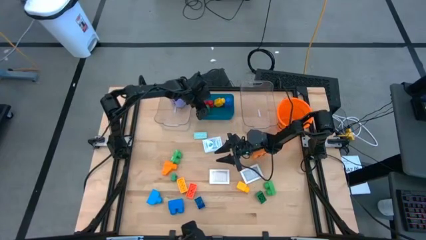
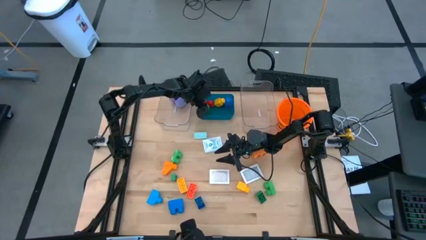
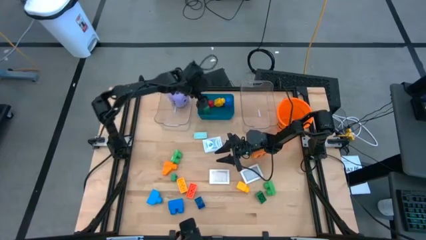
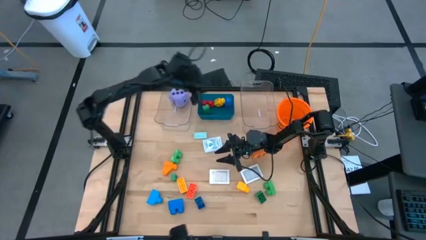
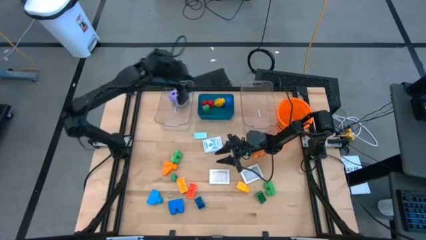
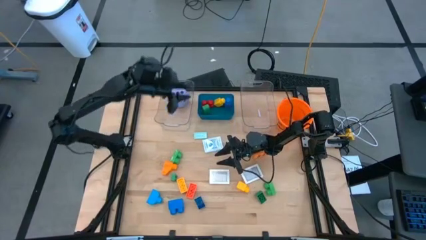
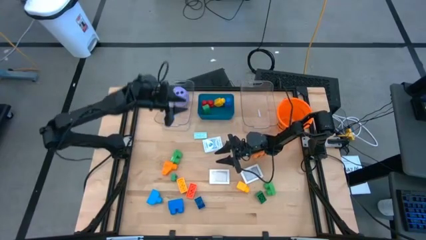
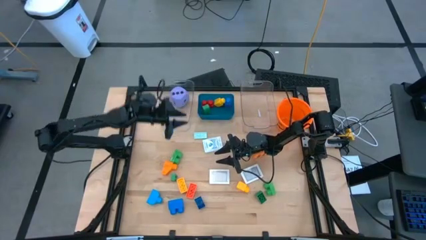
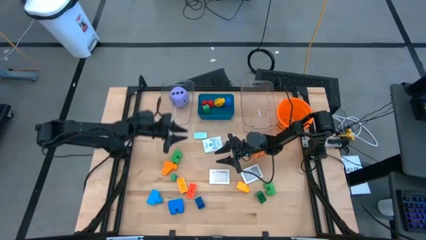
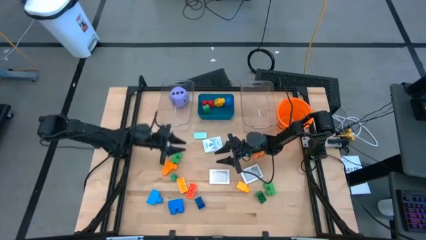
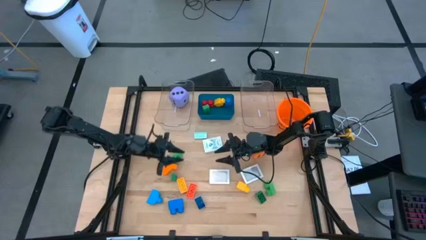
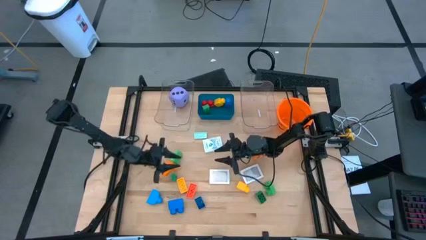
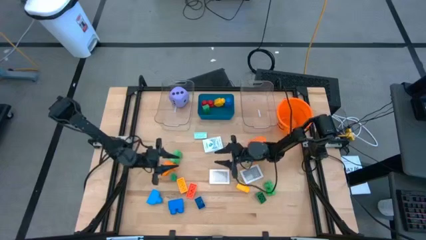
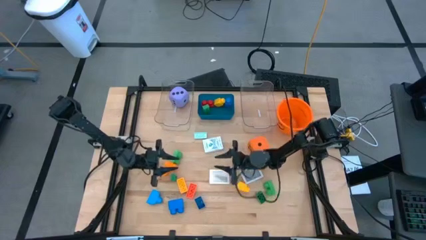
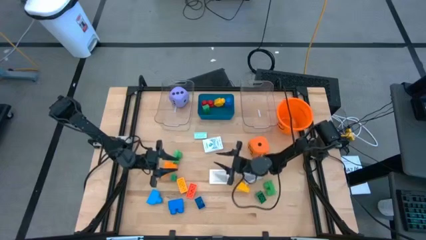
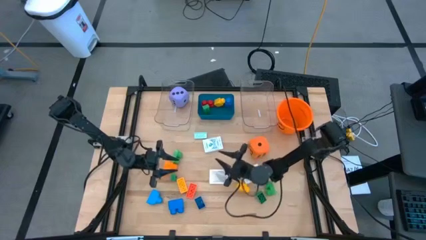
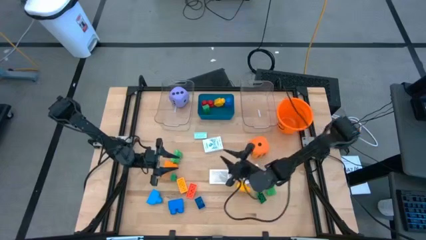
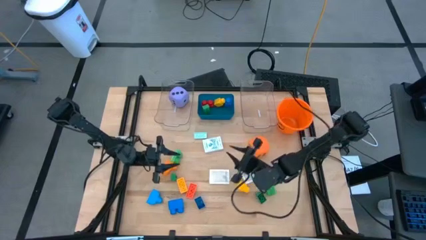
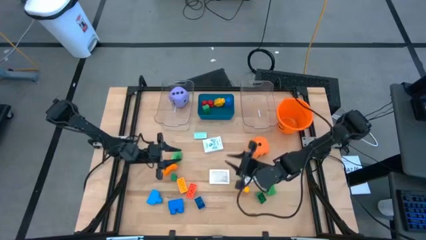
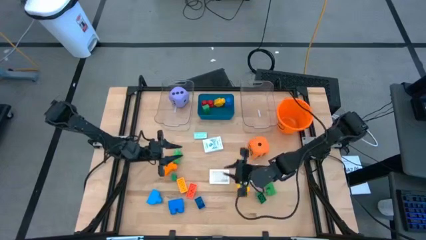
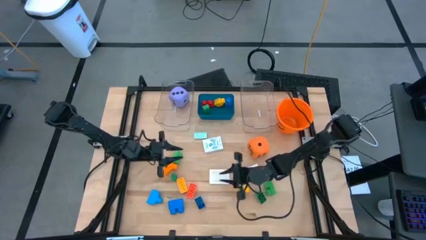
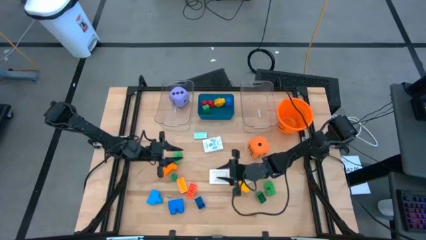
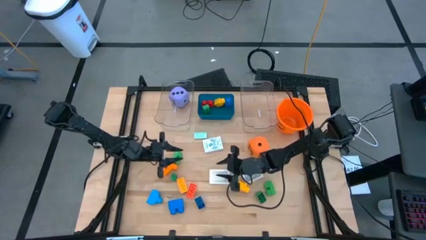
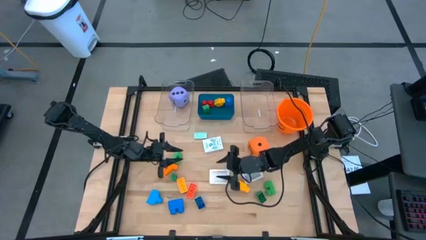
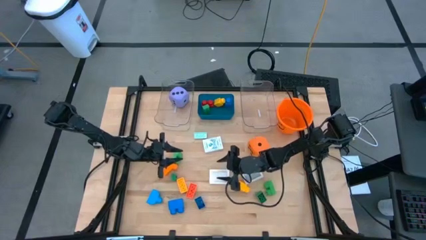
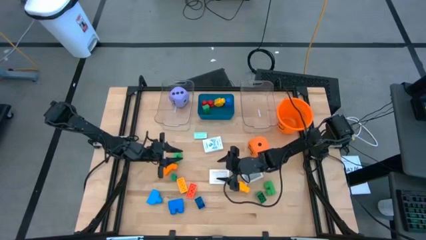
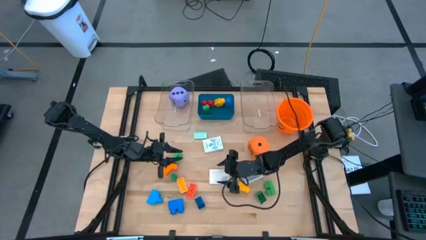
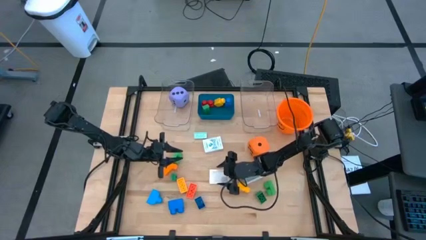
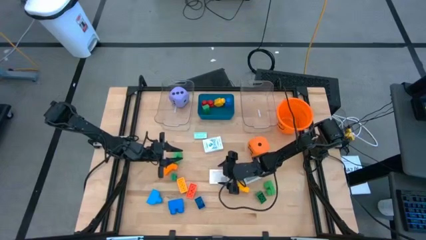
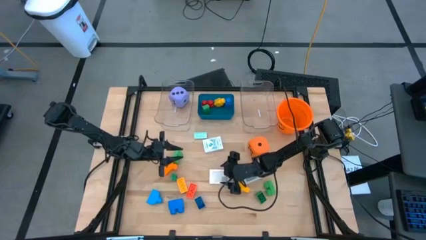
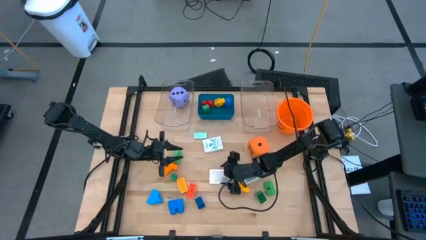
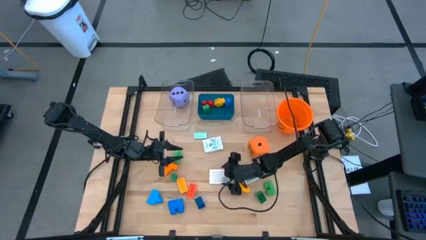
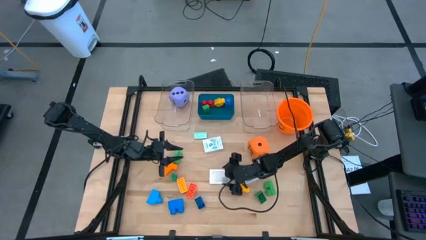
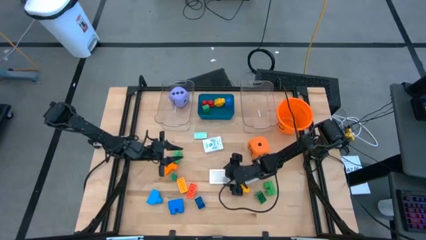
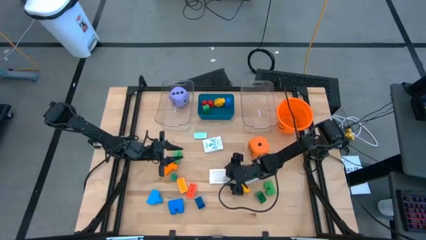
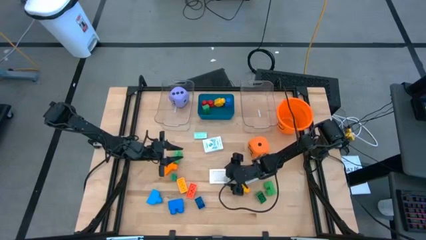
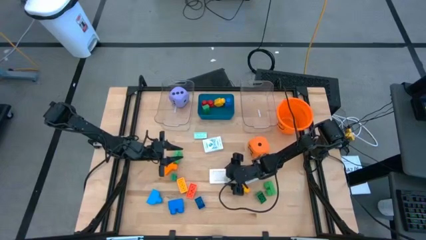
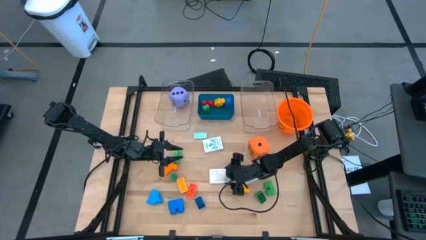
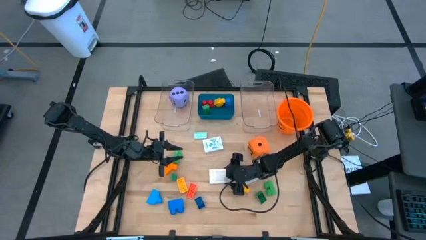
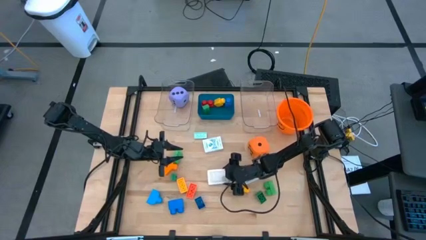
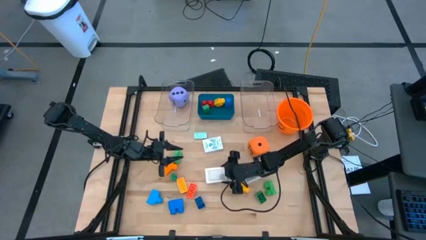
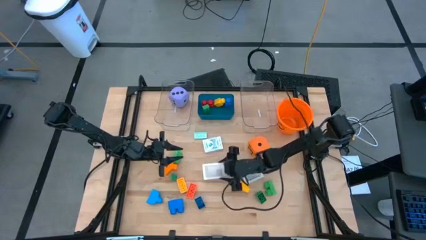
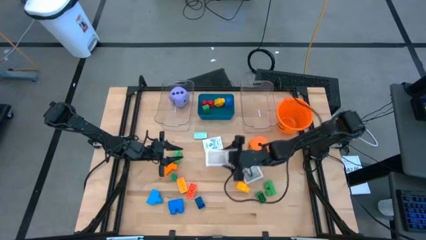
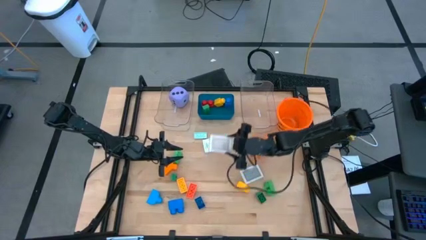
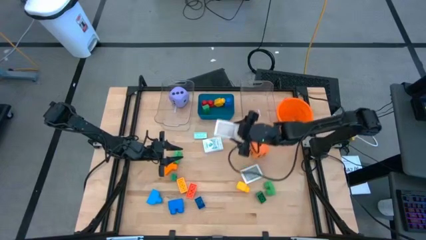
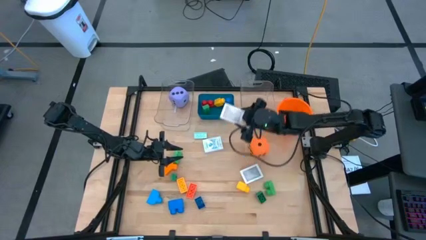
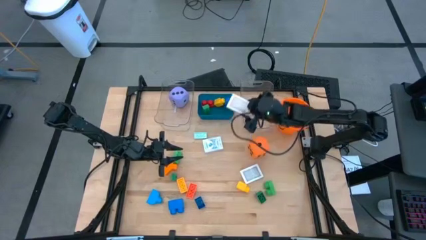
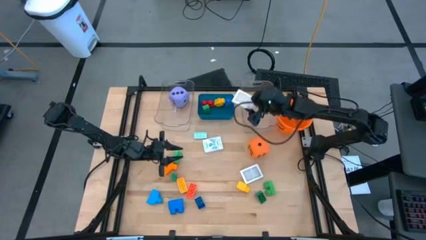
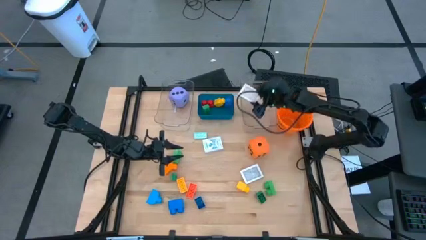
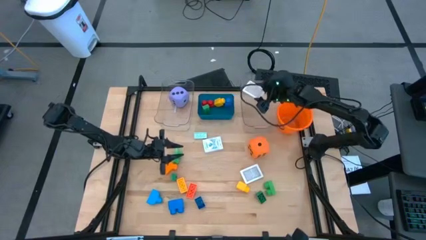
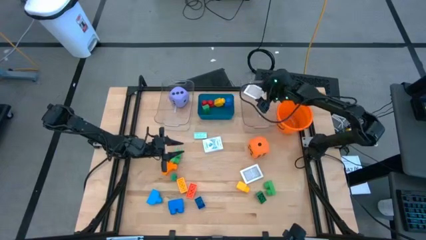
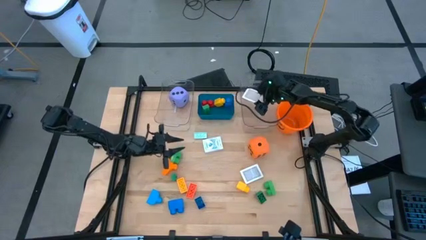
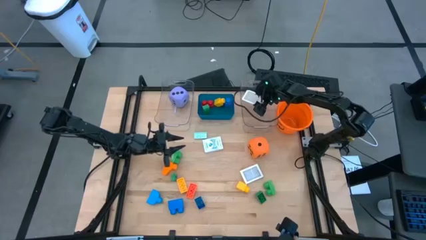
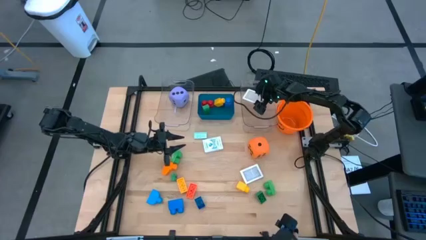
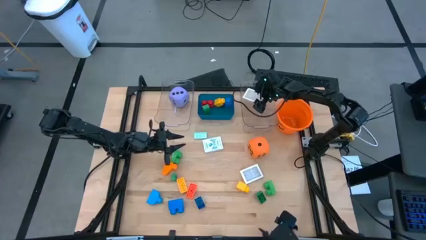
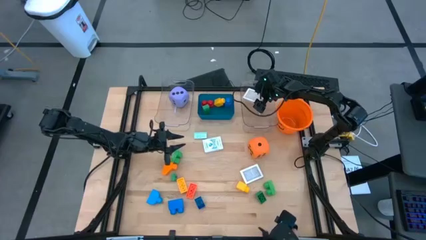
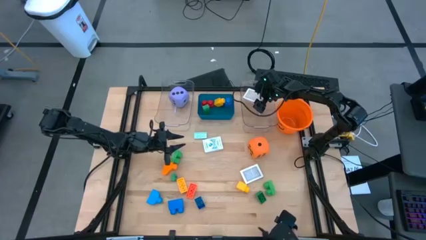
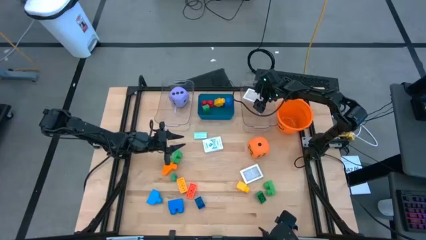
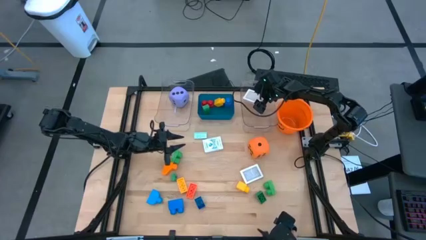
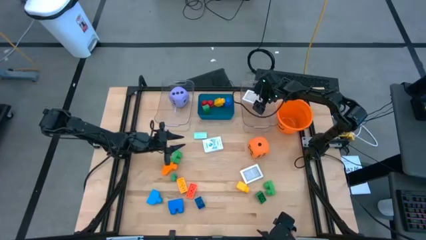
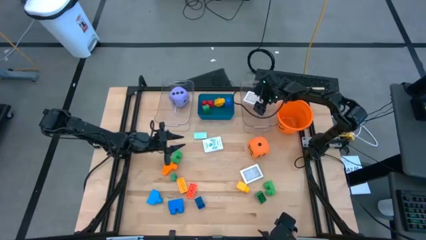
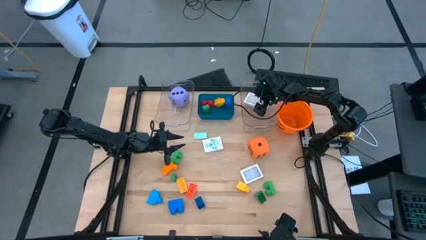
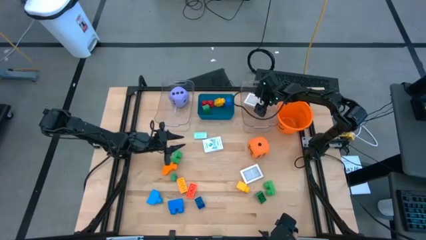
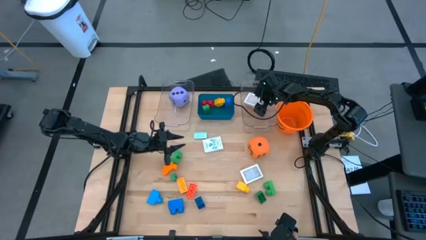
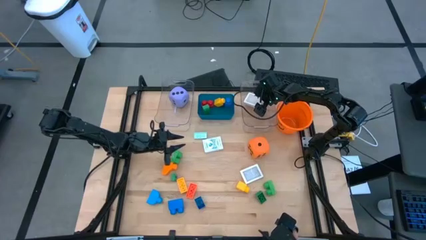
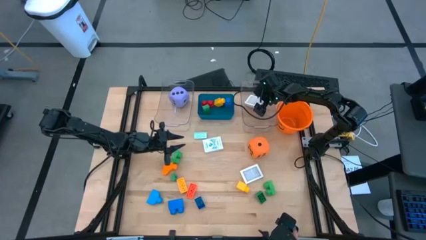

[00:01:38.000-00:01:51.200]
Task: Pick & Place Toys
Put the brown deck of cards into the right transparent bin

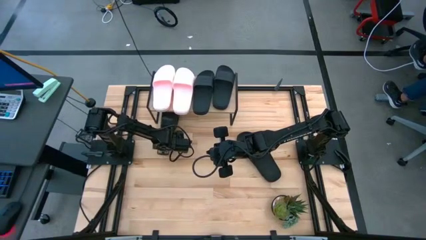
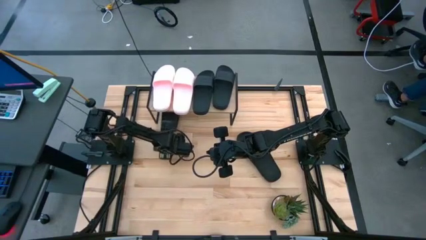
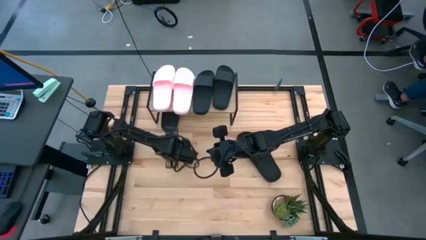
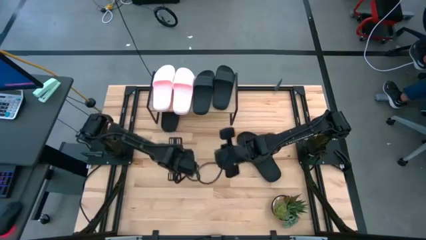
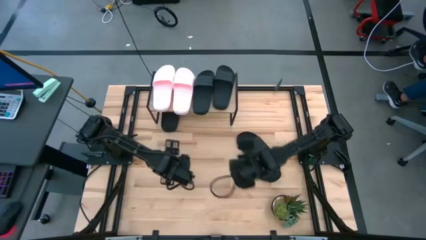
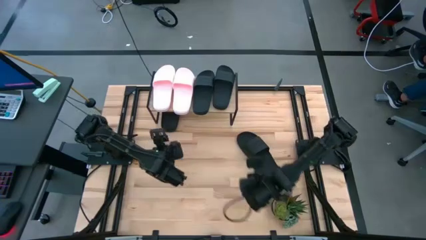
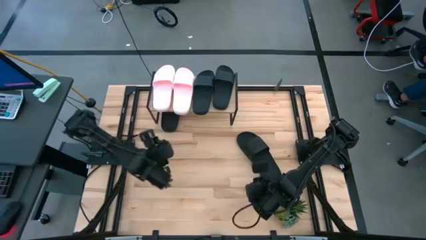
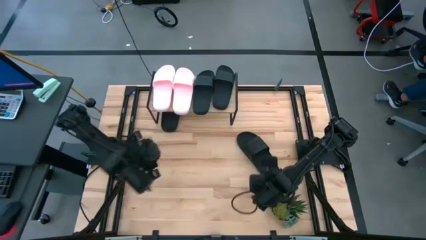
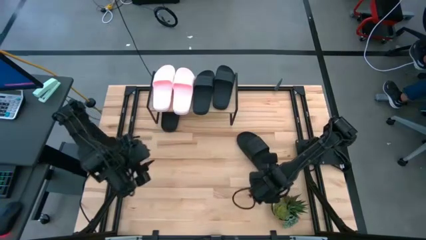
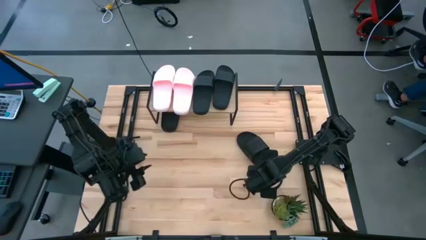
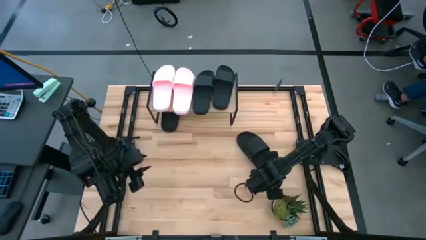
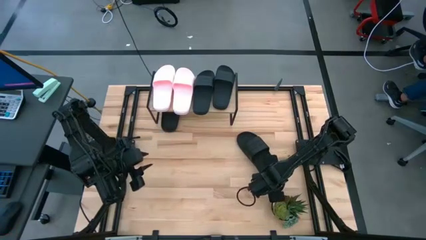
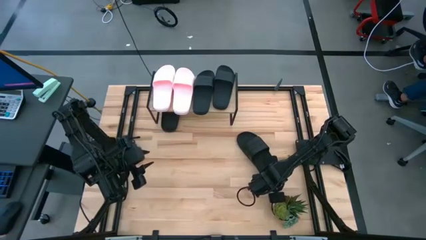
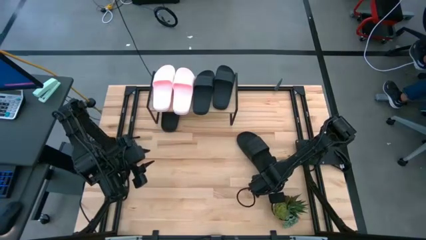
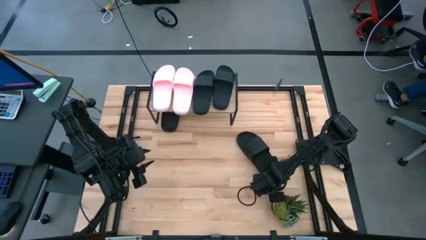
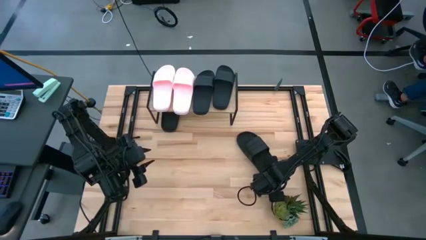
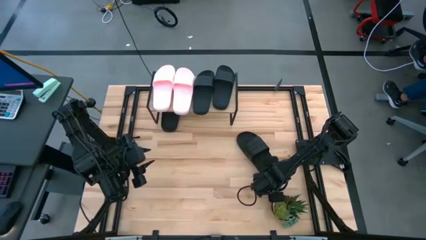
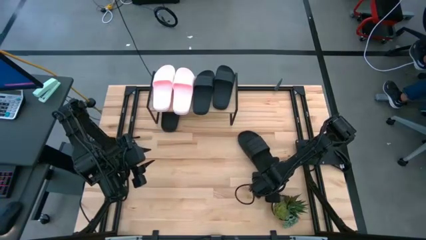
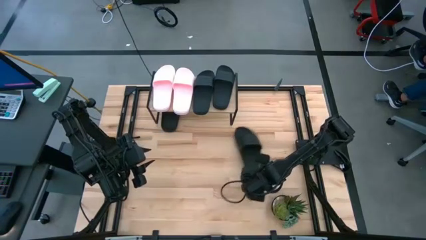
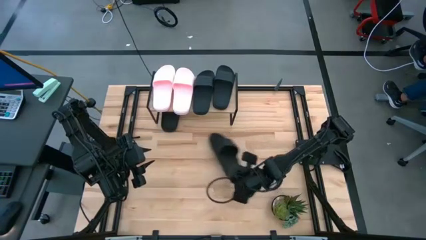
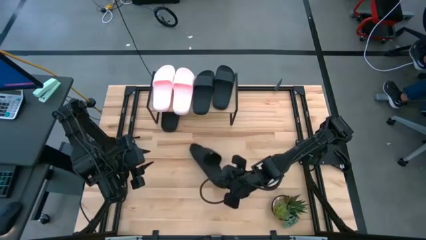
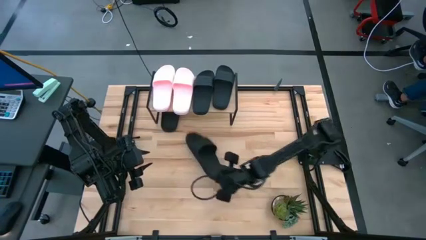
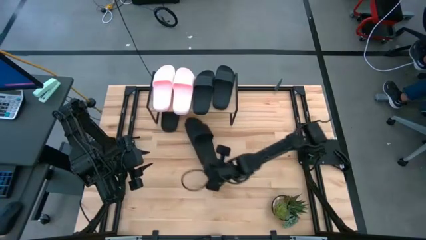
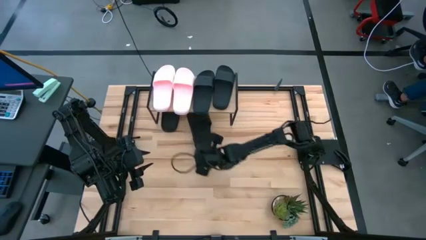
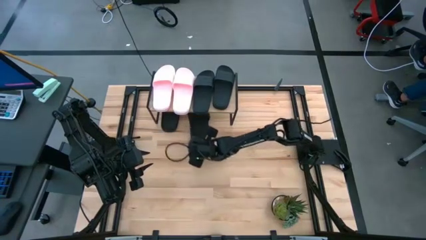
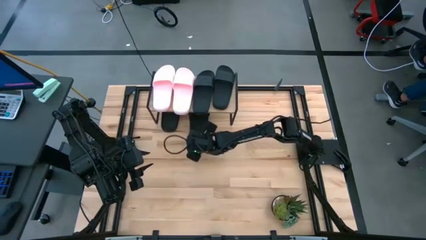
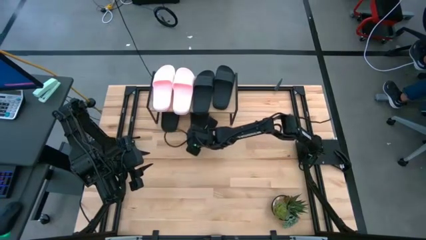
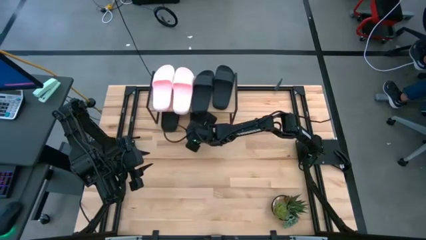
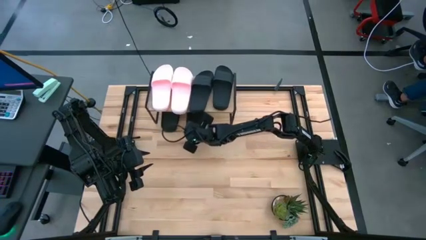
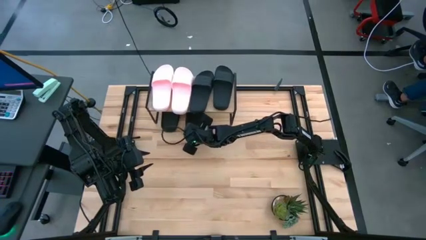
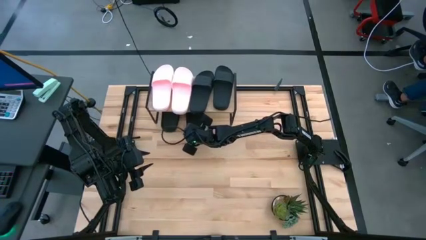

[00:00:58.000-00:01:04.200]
Task: Pick and place slides into the shelf
Put the black slide under the shelf
